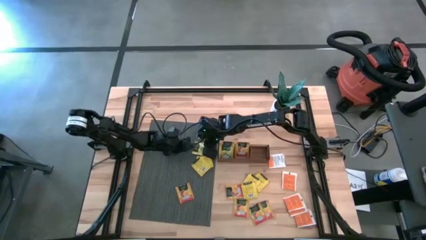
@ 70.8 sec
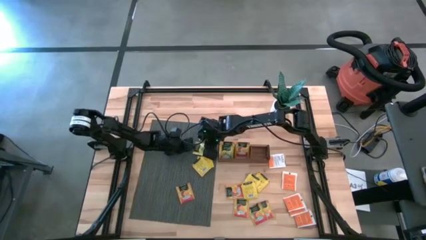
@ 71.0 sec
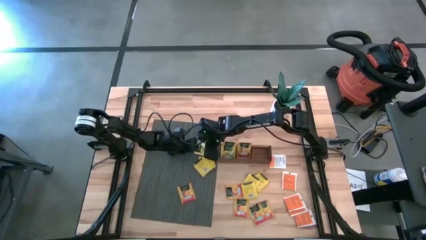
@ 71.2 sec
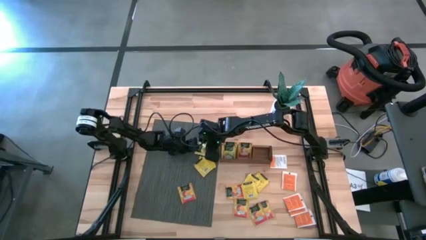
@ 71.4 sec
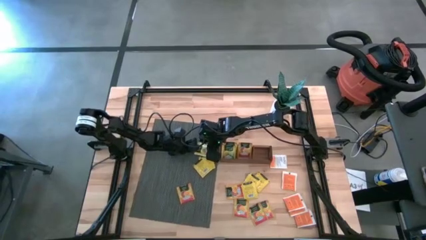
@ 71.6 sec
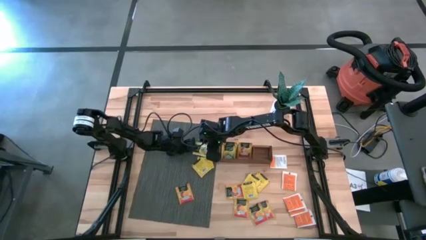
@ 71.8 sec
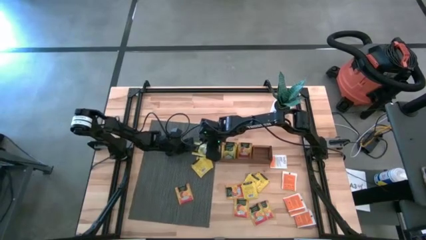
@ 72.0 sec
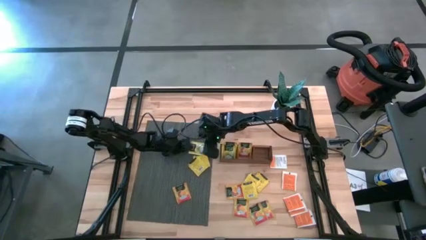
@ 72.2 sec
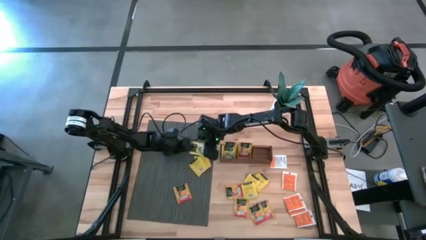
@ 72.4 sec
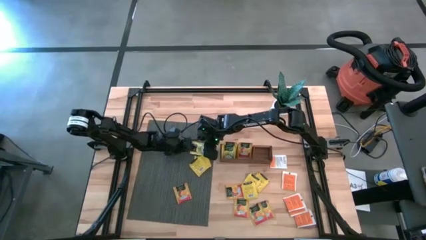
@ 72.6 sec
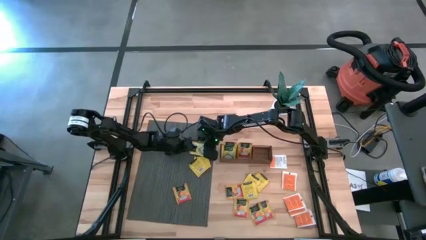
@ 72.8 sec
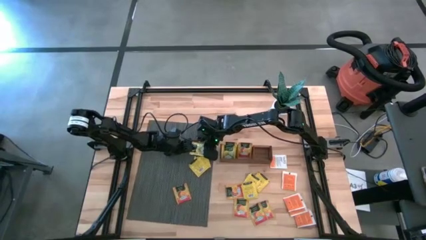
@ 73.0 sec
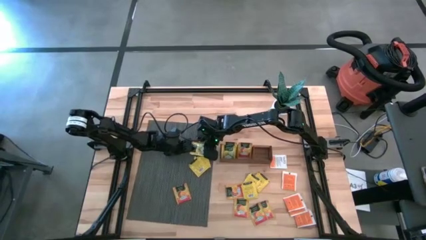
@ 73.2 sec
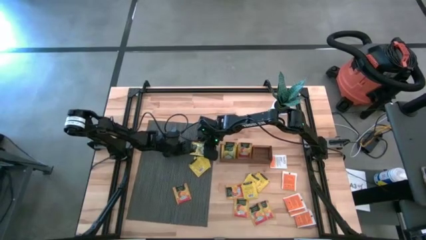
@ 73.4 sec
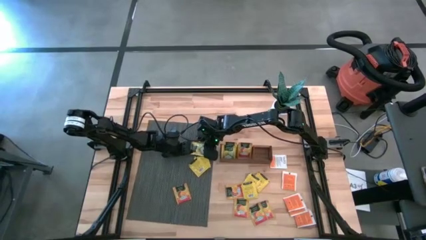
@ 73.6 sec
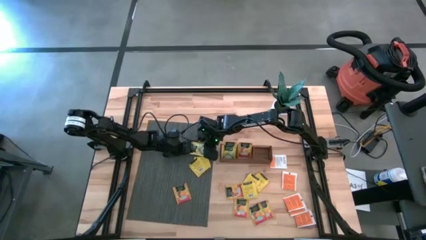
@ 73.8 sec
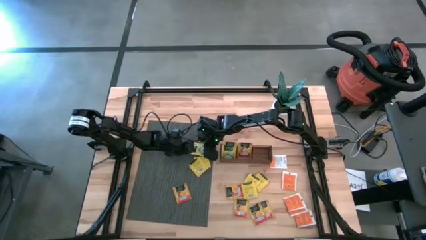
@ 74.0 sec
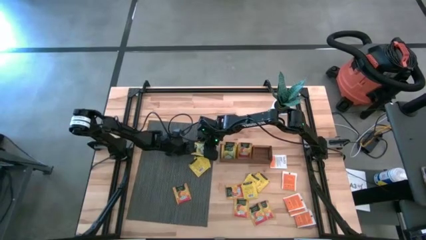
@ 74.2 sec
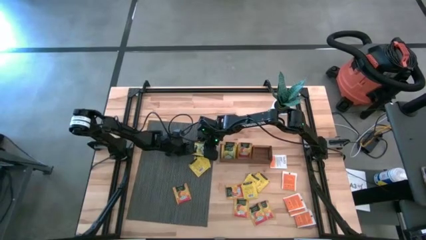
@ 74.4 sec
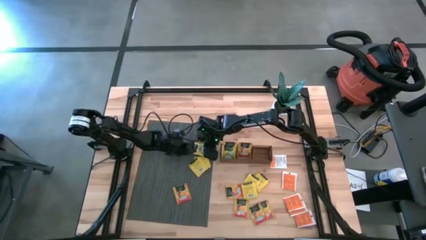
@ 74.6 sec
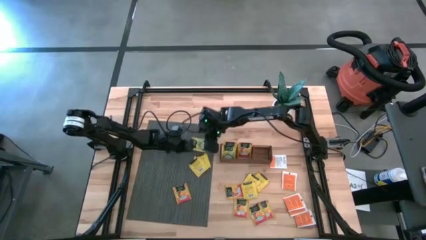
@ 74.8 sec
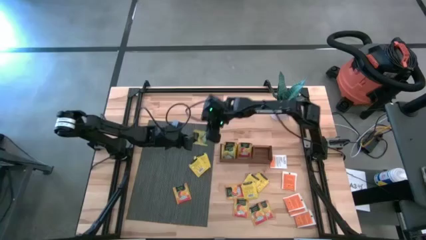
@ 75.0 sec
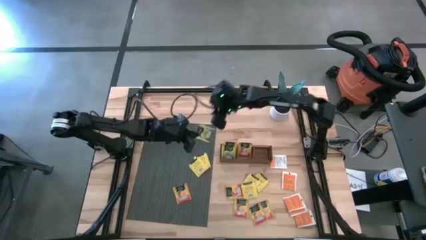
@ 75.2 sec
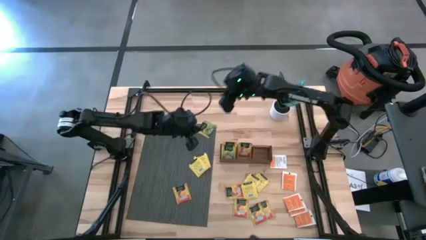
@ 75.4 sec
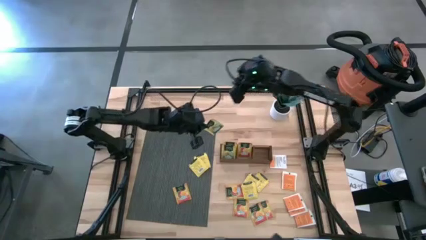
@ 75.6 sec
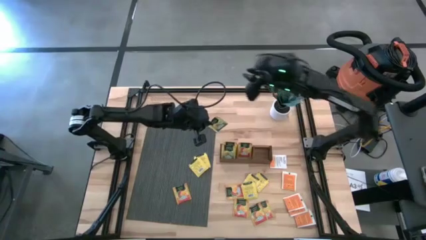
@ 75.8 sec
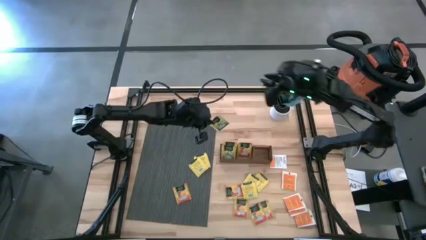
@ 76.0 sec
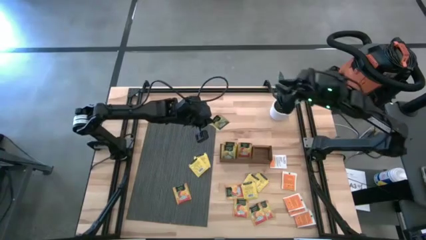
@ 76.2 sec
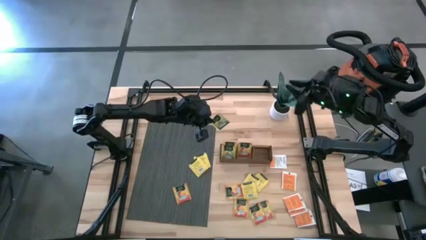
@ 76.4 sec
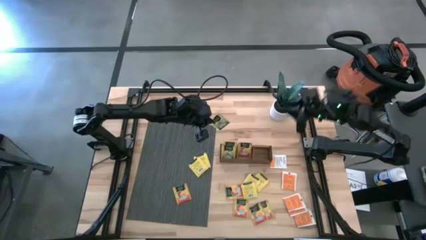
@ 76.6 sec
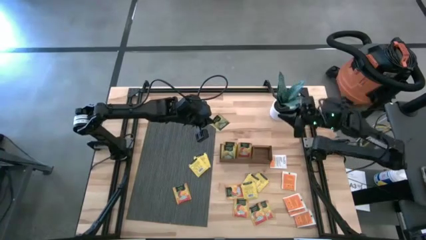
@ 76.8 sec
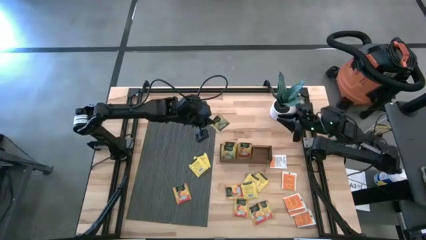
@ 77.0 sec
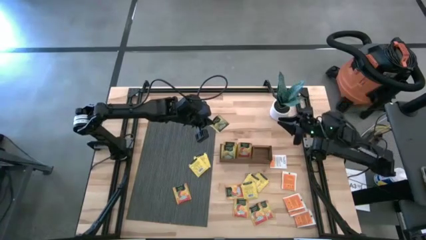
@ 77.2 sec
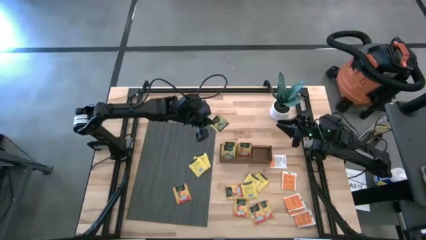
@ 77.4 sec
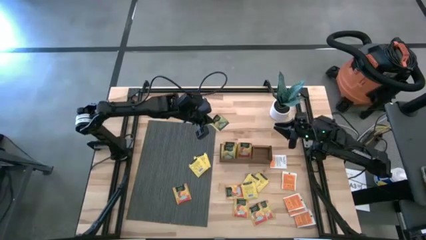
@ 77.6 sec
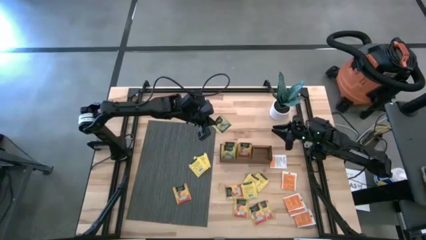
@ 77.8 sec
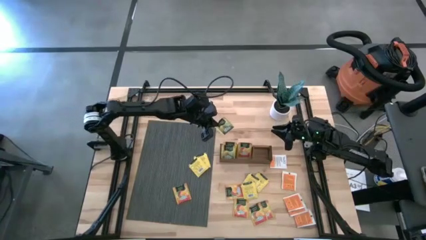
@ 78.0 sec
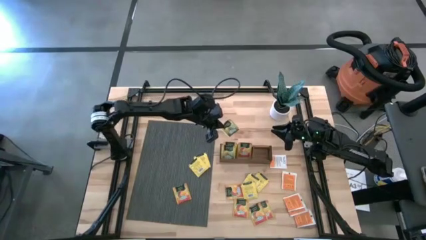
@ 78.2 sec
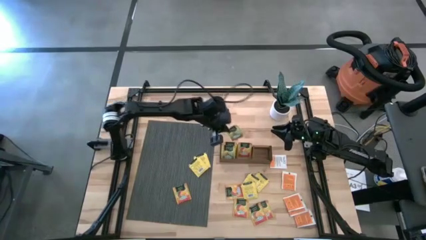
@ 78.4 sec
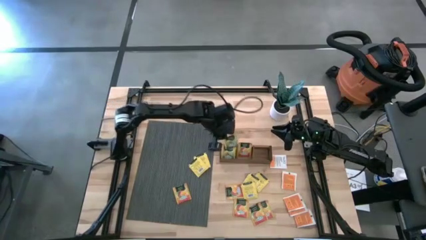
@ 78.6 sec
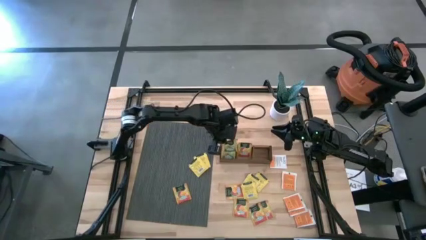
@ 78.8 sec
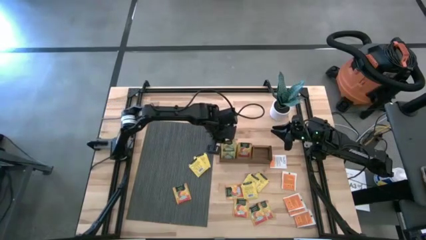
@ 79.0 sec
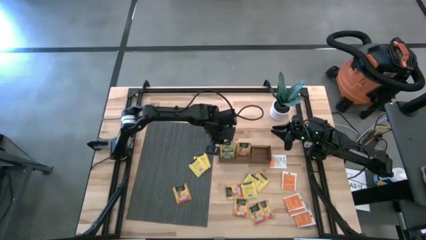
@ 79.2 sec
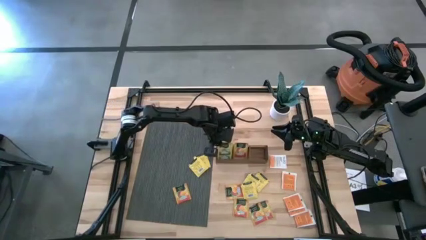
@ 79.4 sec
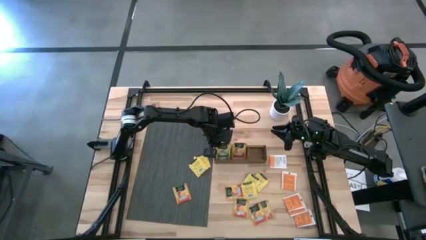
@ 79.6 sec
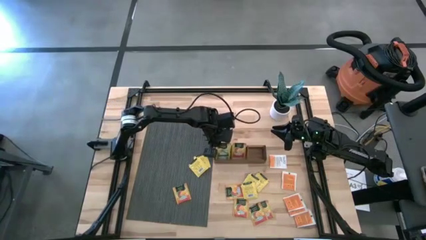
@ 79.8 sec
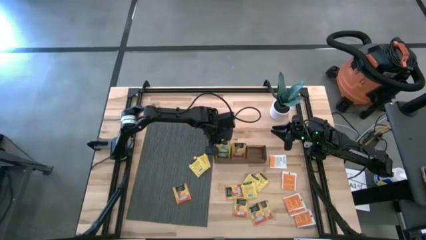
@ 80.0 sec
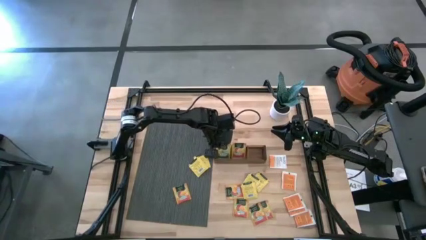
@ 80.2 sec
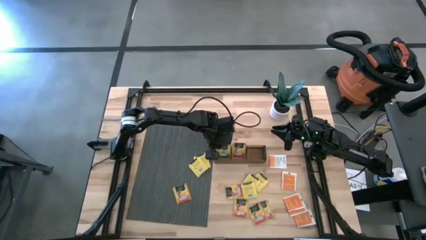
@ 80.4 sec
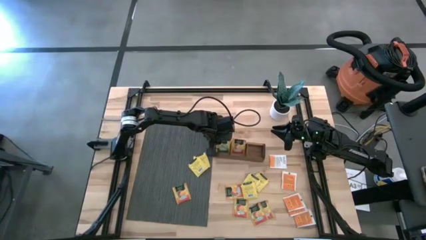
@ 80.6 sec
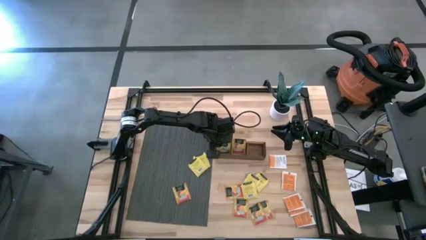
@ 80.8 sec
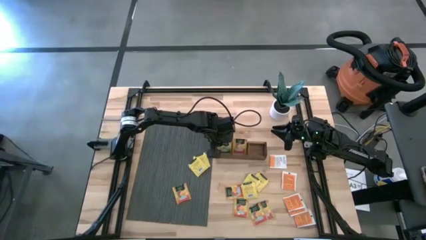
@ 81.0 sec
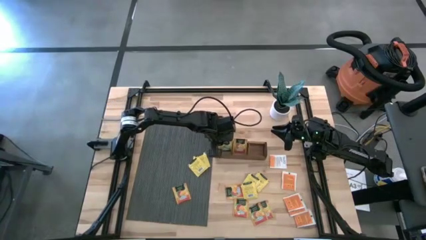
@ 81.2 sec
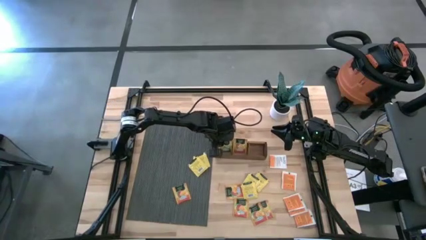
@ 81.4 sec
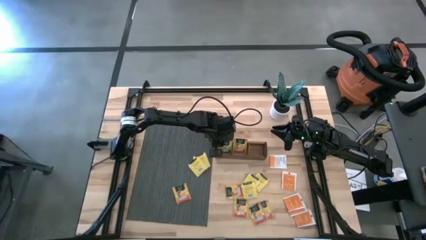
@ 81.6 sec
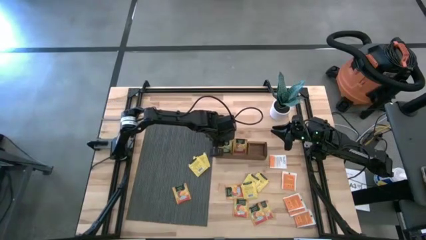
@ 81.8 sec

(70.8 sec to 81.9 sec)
Task: Pick & Place Tea
Put the yellow tea bag into the middle section of the wooden organizer

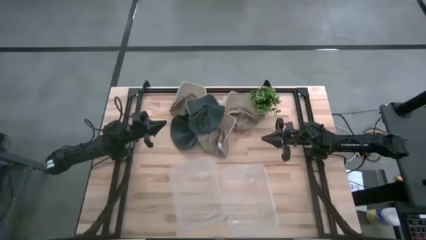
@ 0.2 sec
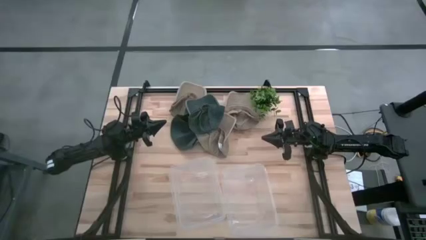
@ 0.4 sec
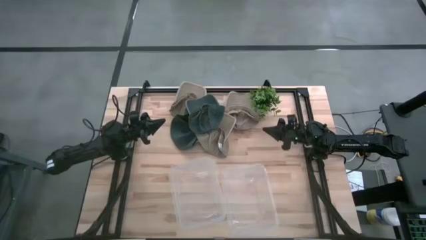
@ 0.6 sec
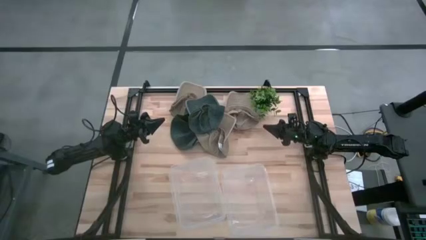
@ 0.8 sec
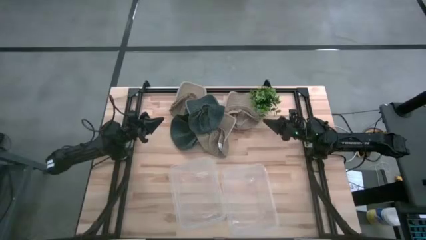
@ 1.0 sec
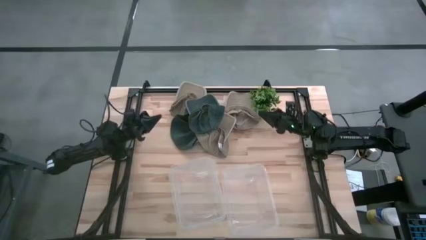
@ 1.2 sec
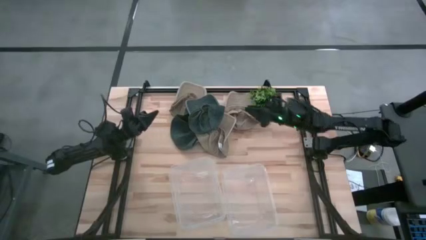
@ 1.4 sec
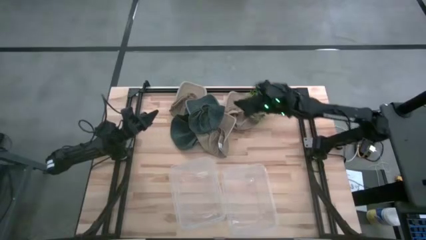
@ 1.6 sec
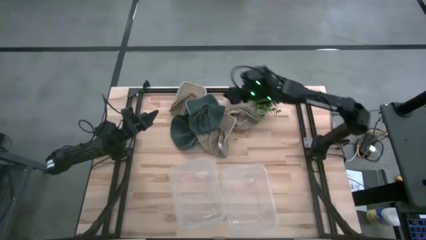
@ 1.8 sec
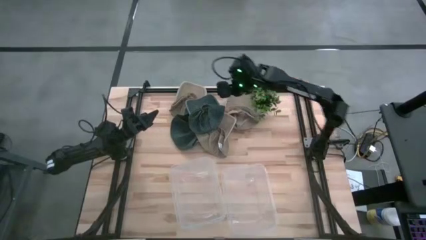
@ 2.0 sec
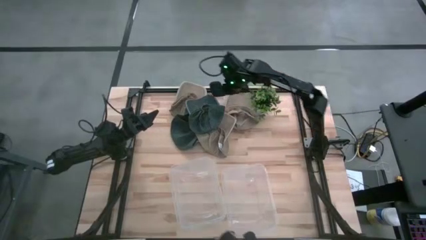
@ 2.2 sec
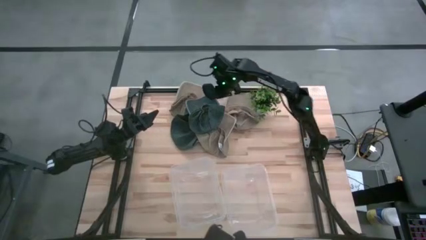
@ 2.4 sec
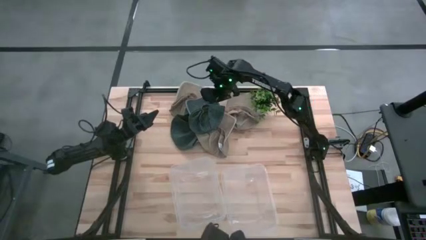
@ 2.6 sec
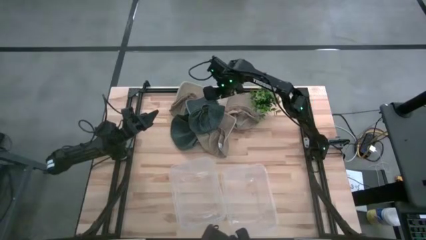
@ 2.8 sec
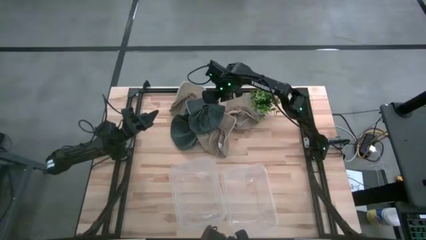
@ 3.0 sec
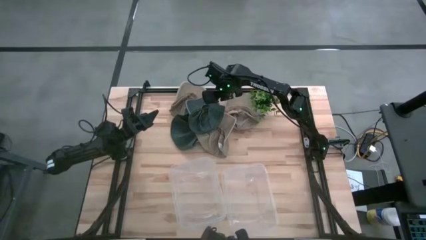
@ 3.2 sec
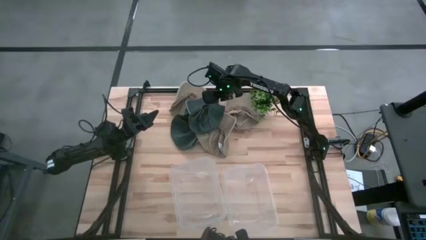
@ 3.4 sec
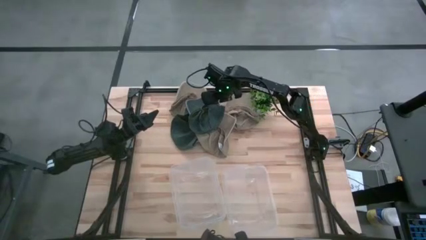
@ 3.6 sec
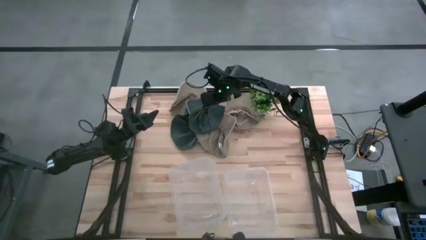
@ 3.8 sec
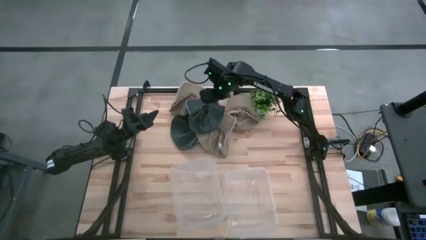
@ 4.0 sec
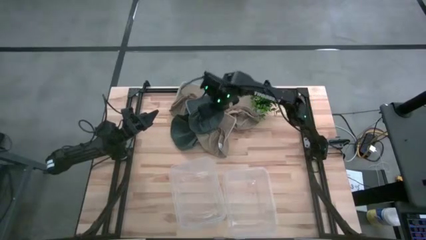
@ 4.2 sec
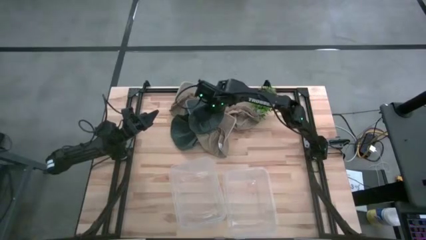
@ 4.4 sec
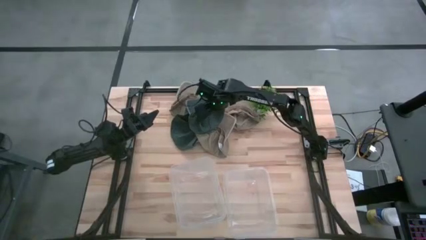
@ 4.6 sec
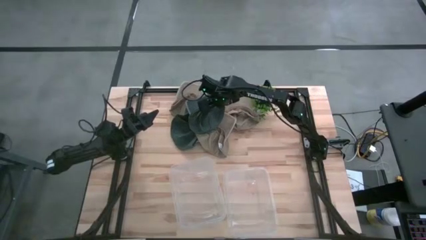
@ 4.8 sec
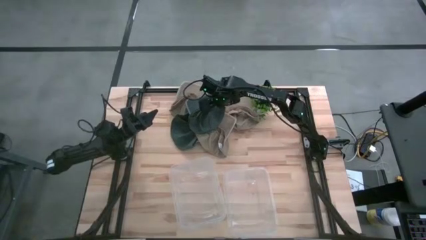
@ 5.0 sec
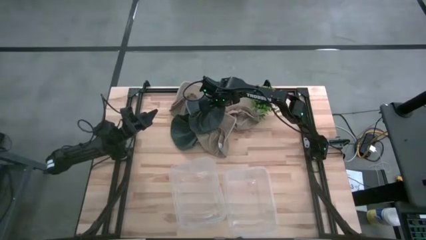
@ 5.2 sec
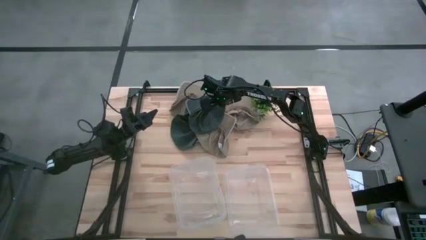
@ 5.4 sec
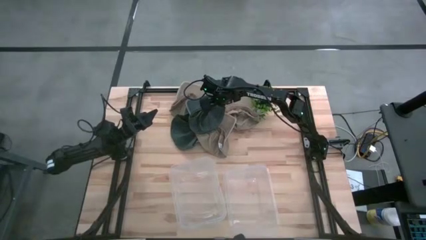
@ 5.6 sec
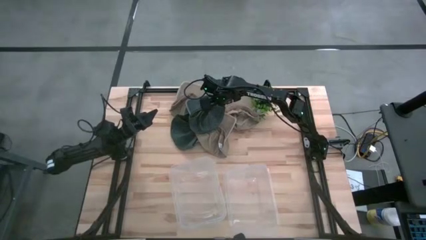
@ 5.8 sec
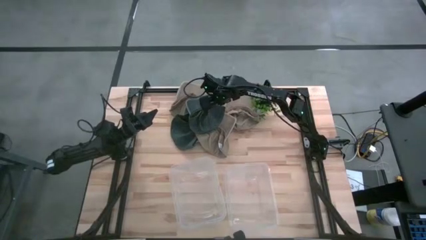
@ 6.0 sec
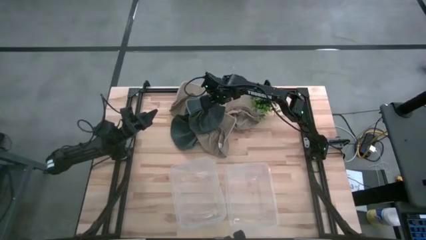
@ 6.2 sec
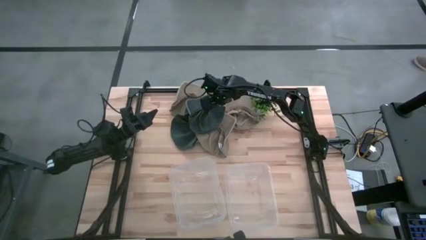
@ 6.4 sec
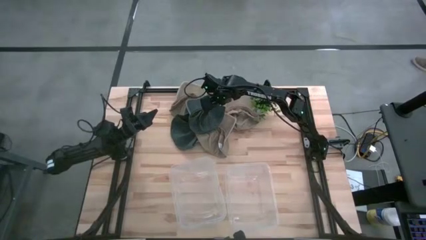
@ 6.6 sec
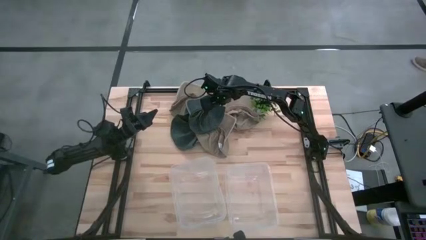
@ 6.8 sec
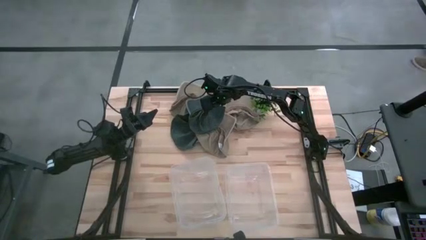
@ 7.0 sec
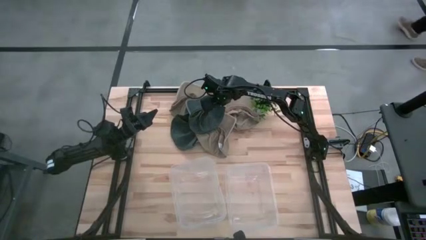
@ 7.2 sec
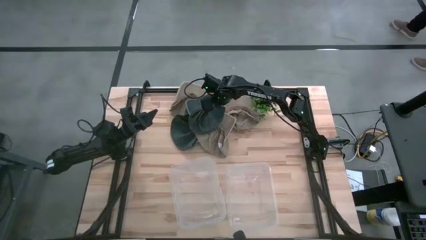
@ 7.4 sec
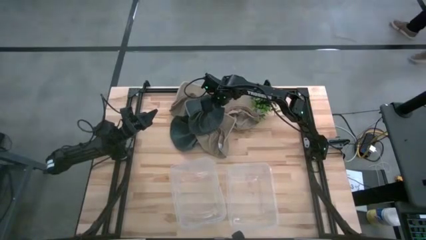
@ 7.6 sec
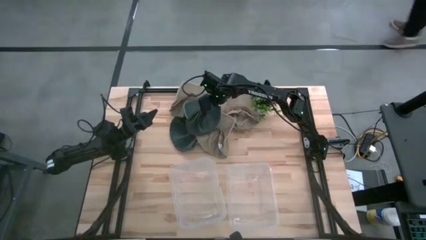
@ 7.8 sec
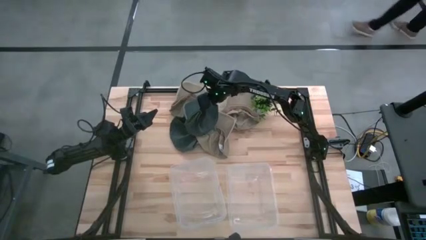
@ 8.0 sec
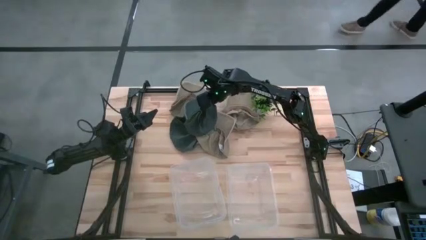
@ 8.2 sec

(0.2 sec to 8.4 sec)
Task: Pick & Place hat
Put the right black cap into the right transparent bin
